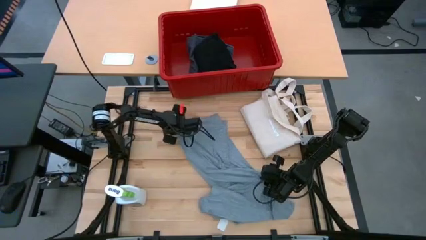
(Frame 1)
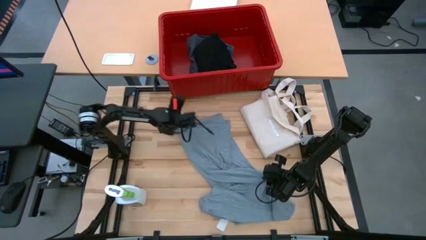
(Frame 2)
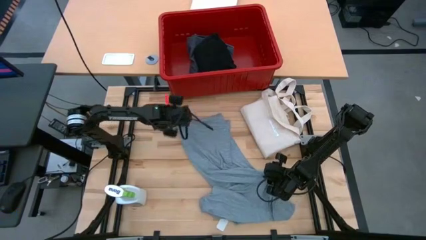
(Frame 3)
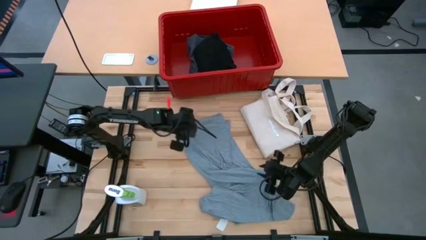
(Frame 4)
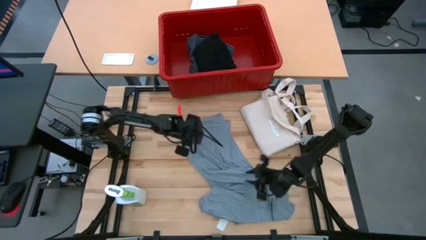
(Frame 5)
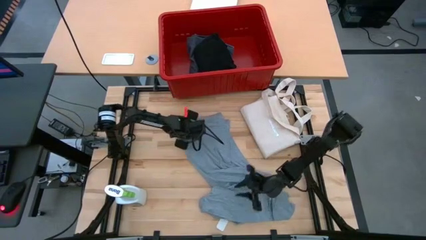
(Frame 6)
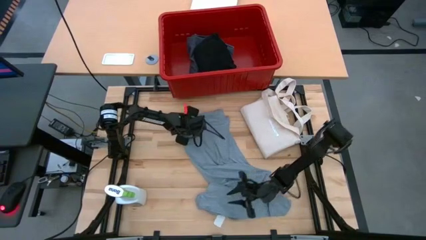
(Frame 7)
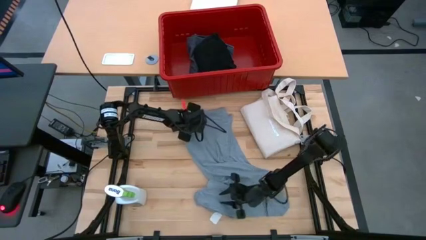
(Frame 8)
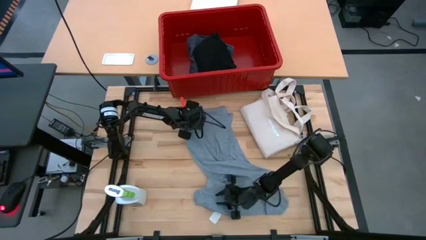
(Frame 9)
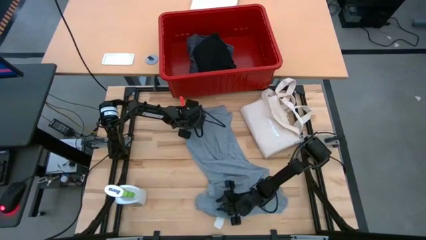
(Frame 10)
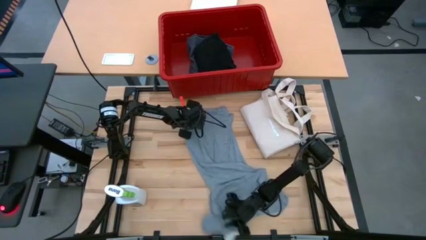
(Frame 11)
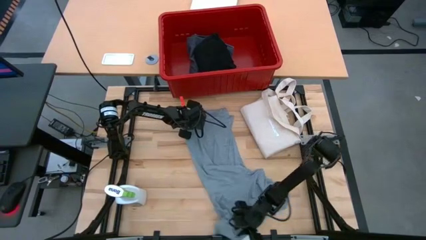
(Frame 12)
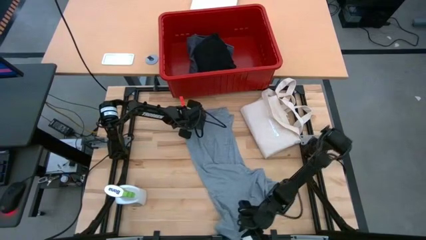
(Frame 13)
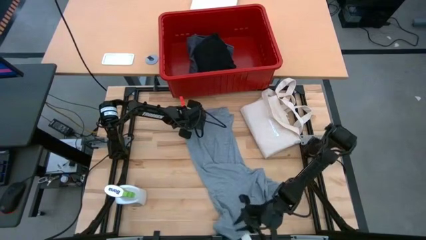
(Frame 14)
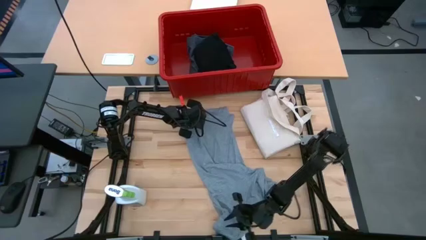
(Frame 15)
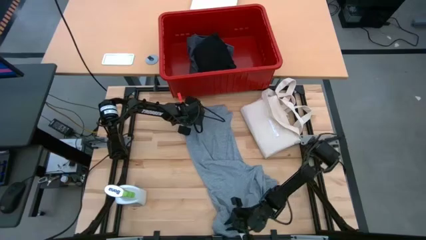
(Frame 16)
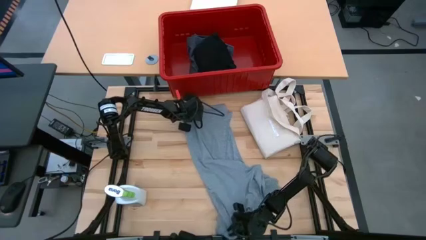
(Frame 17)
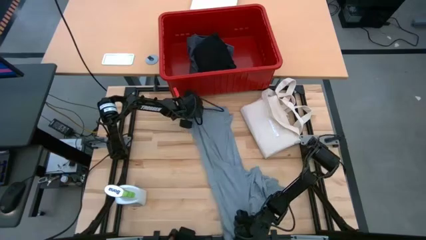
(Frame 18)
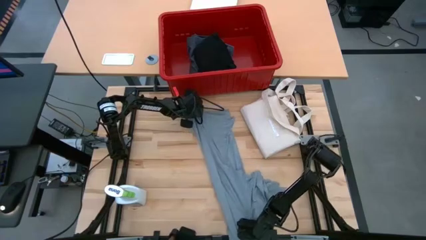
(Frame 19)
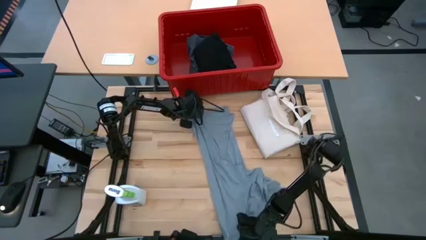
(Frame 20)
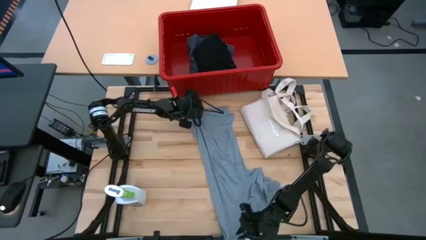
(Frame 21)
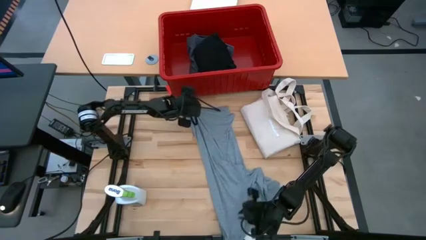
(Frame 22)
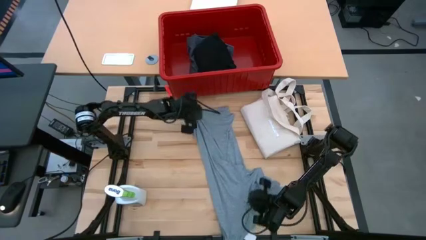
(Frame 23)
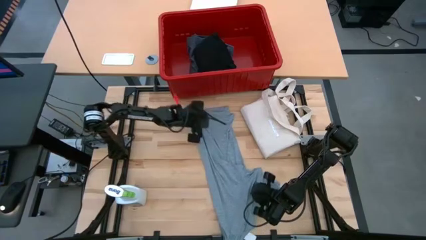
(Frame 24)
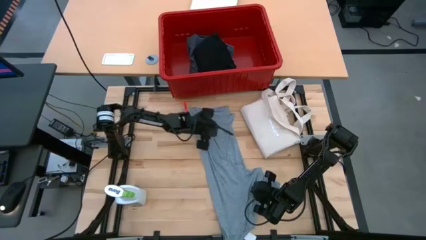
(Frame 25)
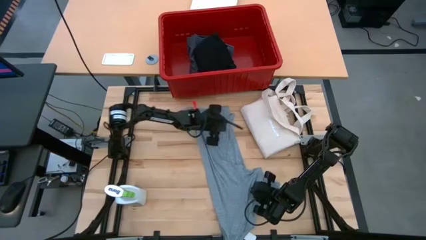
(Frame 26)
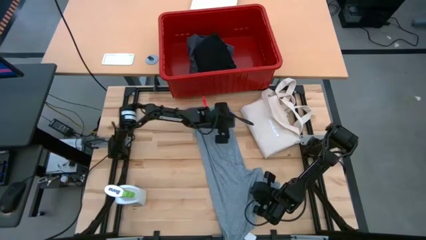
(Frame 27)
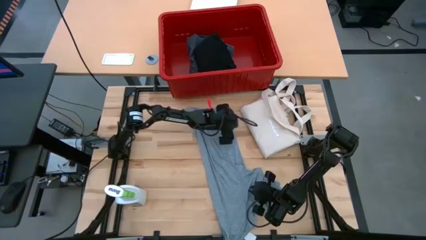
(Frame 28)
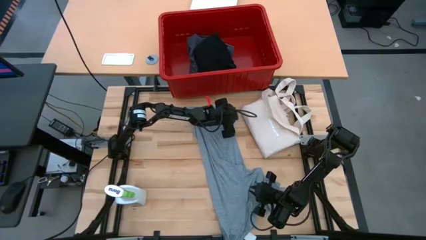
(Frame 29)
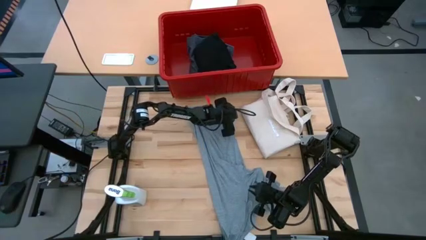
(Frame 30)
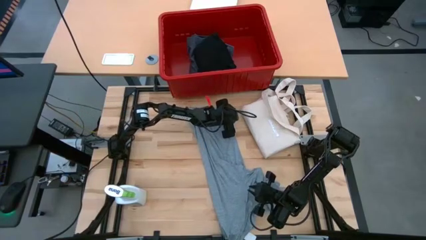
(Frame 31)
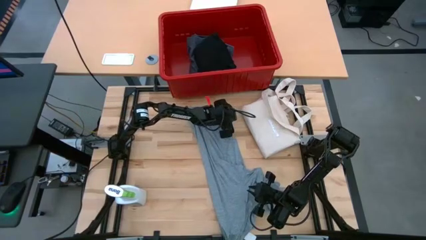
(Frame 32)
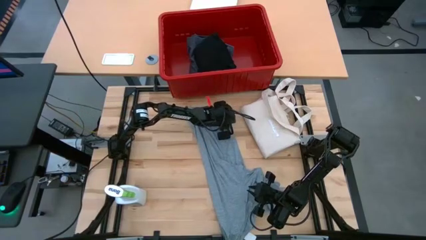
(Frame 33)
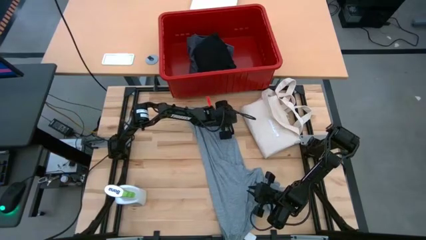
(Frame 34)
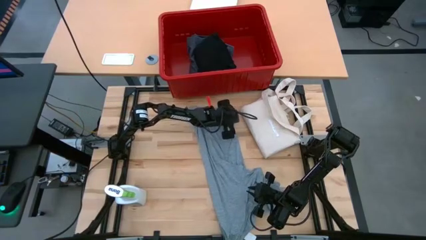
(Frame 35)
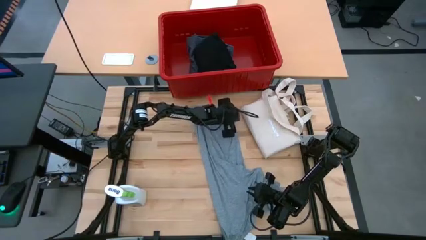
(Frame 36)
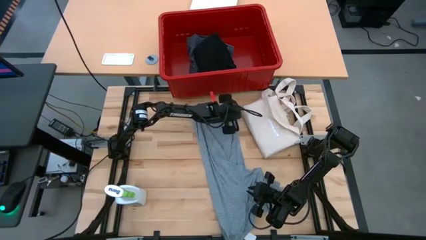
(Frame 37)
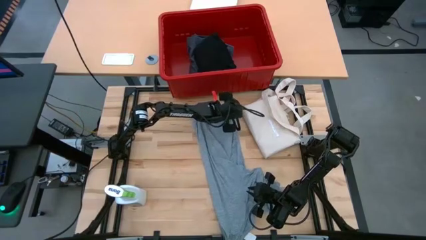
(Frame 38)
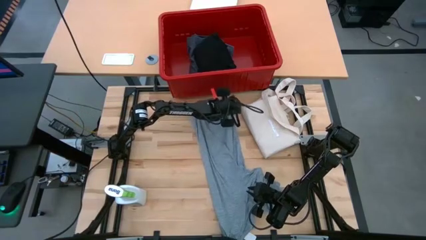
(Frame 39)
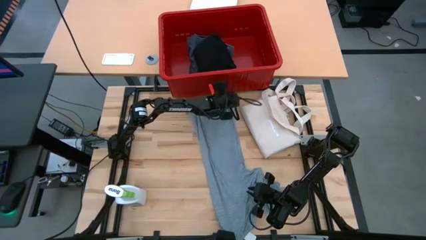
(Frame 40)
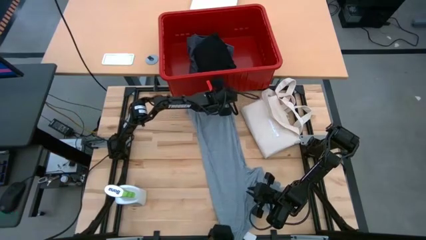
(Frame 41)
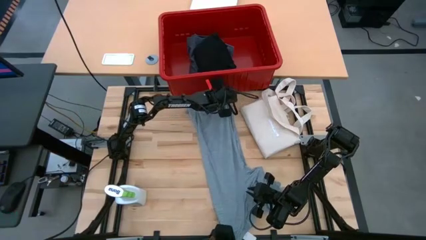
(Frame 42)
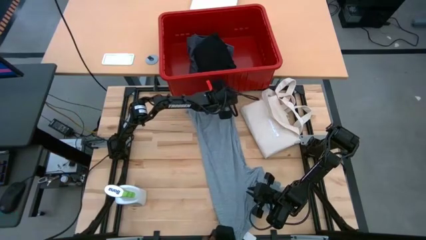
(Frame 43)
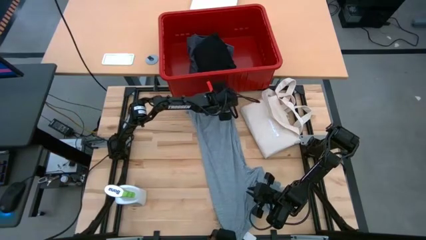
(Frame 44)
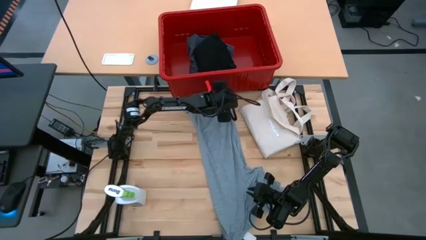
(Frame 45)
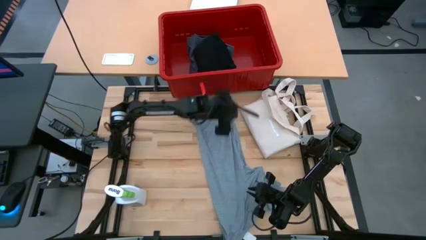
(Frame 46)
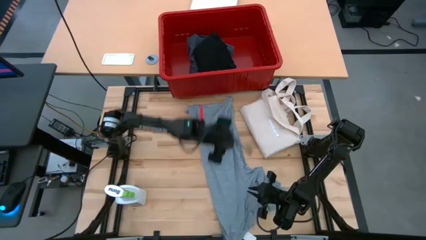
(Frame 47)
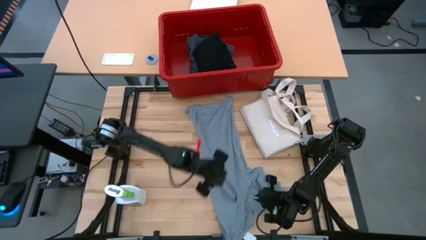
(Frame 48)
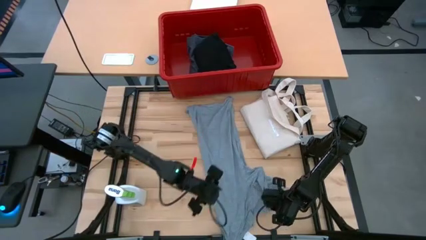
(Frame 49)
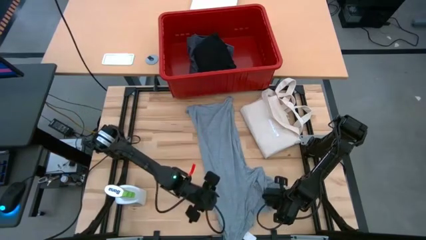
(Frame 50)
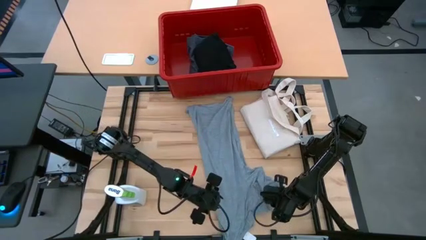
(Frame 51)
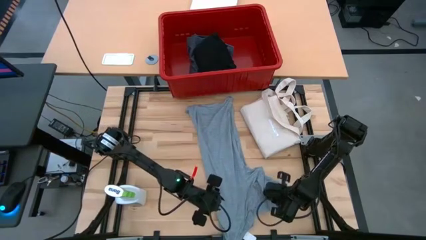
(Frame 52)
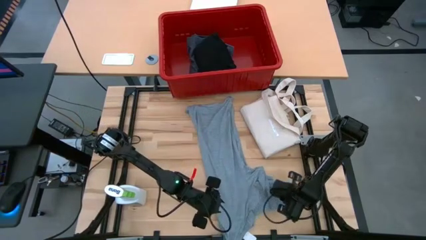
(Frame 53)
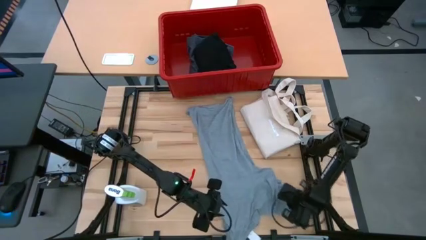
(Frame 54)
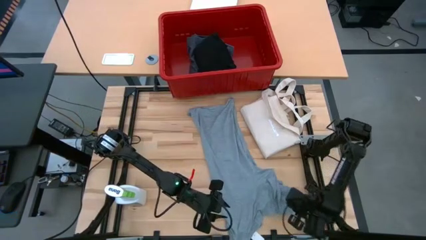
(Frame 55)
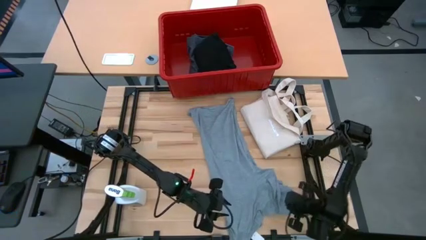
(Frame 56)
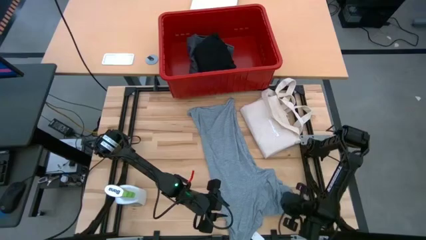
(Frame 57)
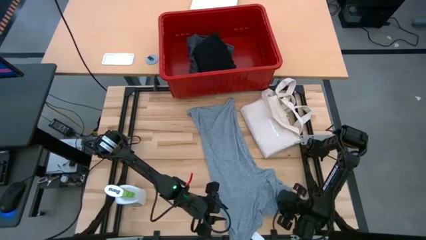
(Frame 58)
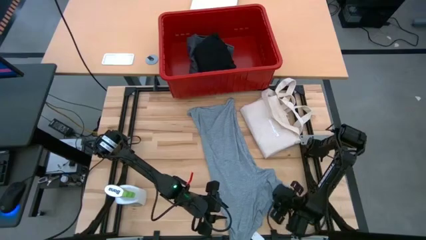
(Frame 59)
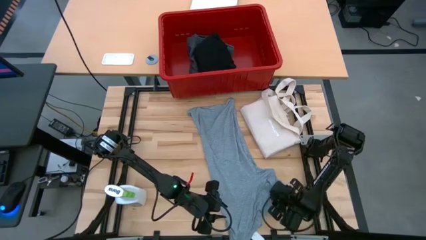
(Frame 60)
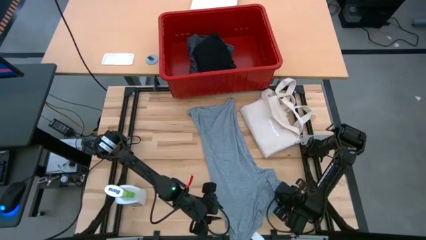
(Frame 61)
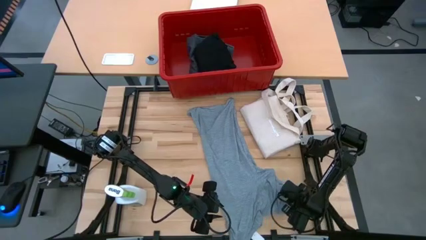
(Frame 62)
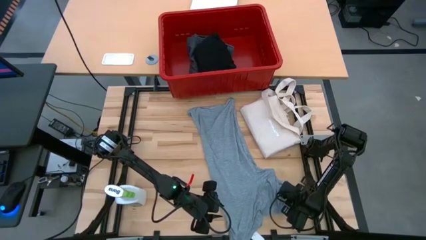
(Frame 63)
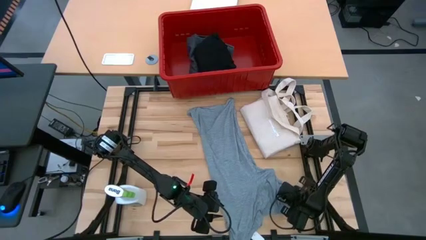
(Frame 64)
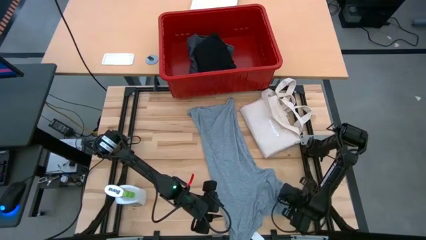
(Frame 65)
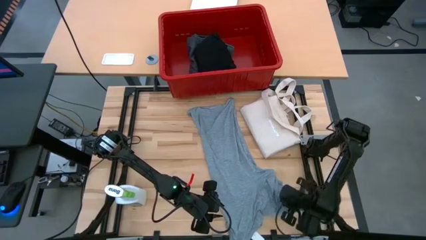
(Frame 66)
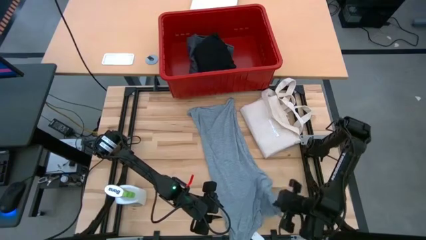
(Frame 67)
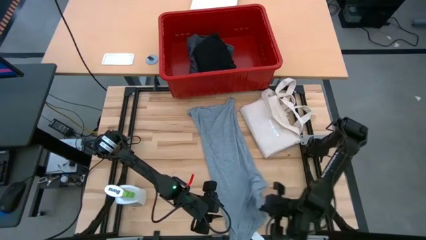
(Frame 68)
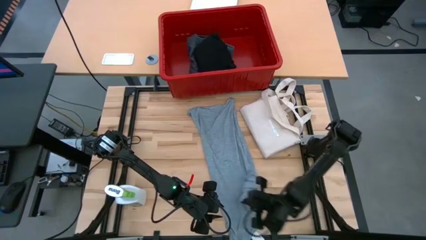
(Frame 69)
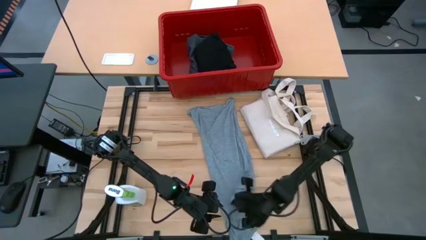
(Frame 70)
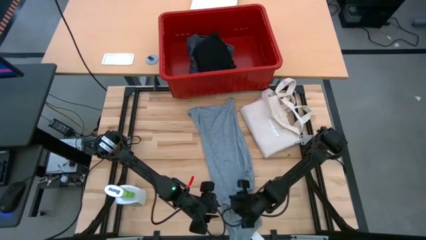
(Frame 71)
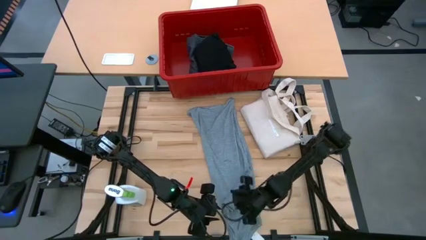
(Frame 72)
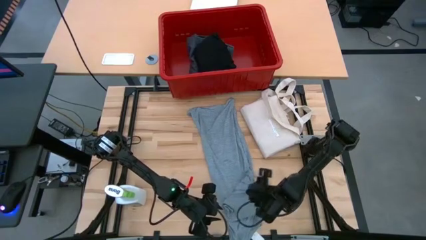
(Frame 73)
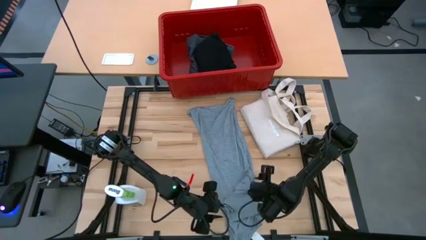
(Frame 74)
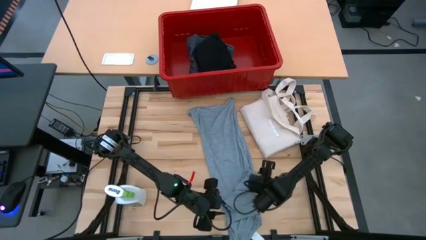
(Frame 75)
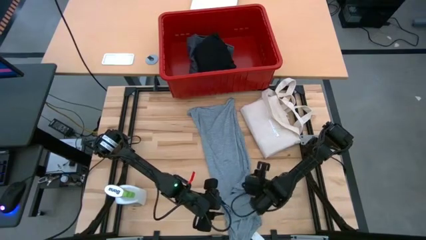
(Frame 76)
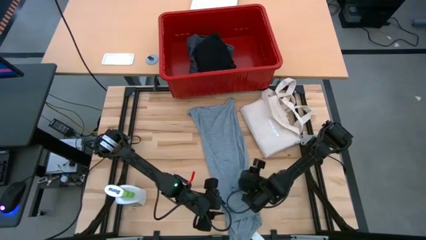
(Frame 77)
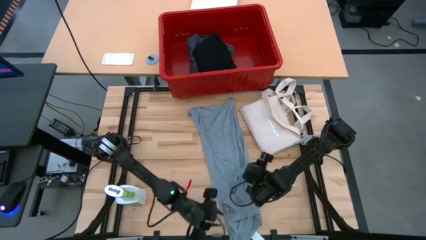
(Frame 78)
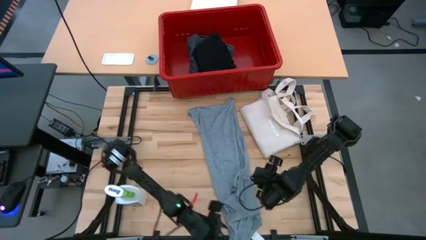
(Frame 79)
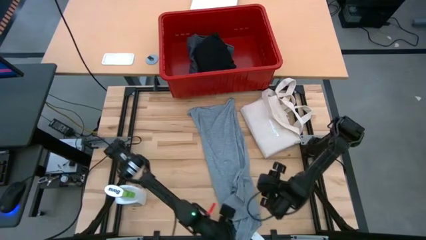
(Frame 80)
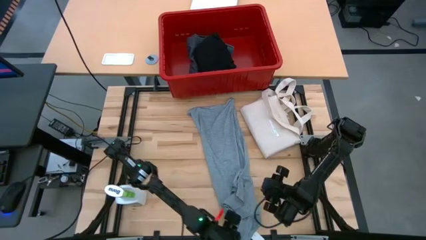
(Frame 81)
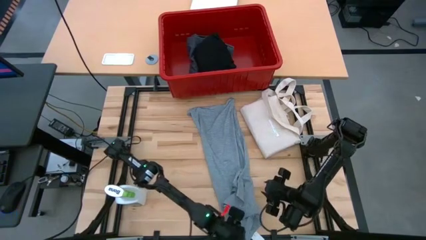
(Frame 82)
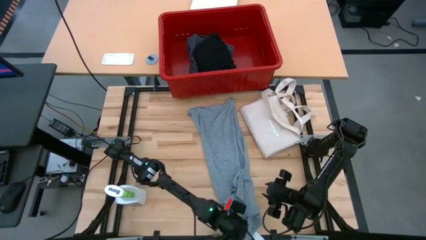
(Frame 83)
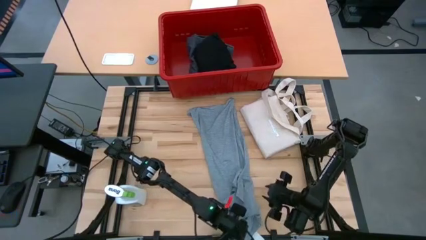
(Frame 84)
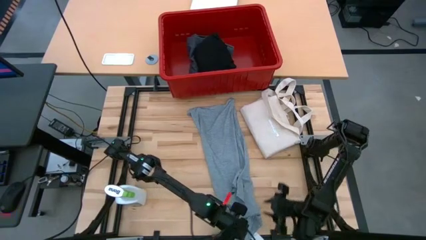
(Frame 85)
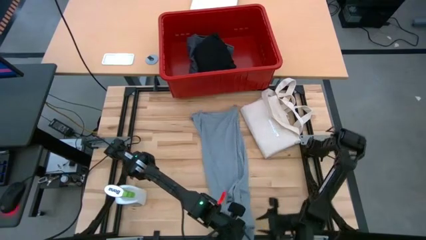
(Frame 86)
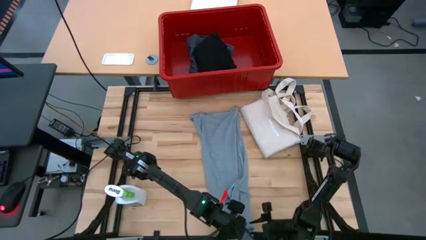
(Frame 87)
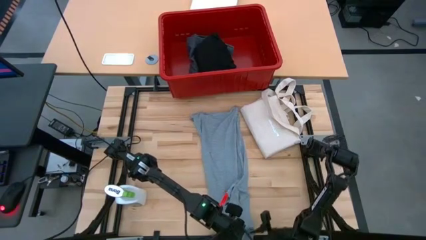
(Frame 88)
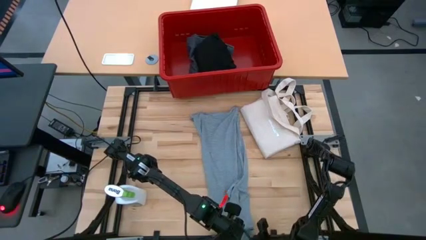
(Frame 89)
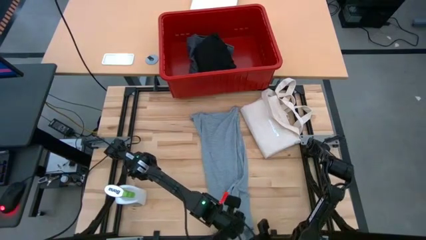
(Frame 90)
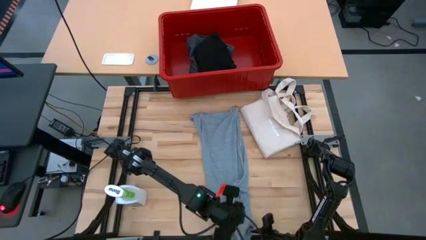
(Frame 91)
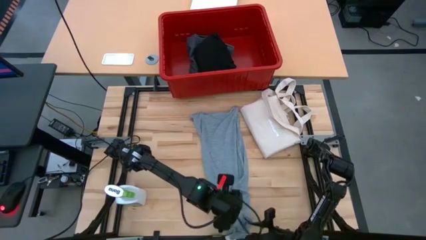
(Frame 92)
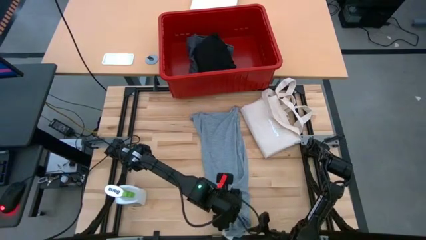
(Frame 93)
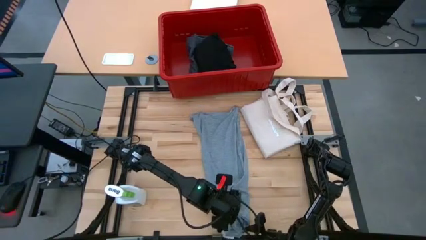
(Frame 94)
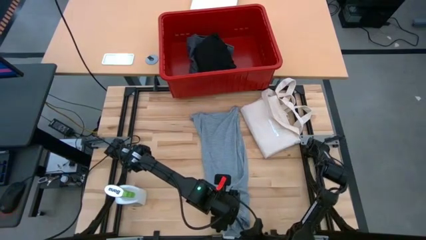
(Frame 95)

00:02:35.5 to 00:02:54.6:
Task: Fold Laundry from Bin
Fold the gray shirt
